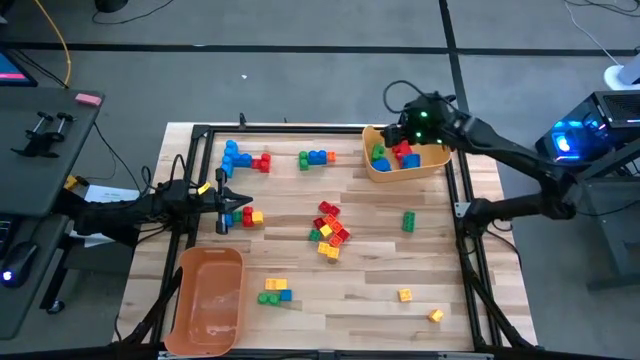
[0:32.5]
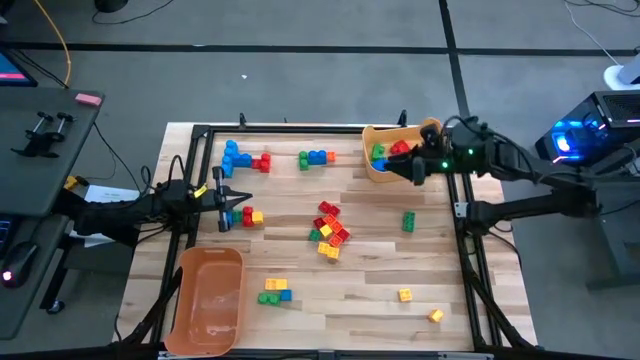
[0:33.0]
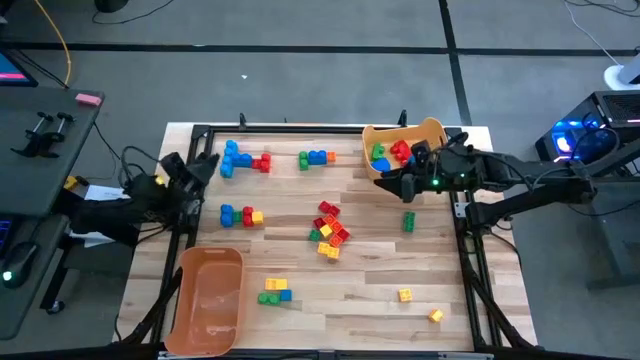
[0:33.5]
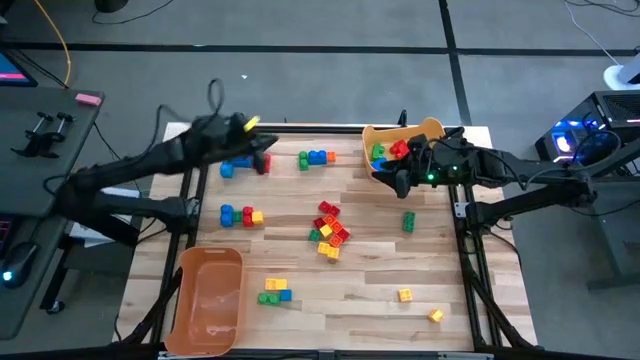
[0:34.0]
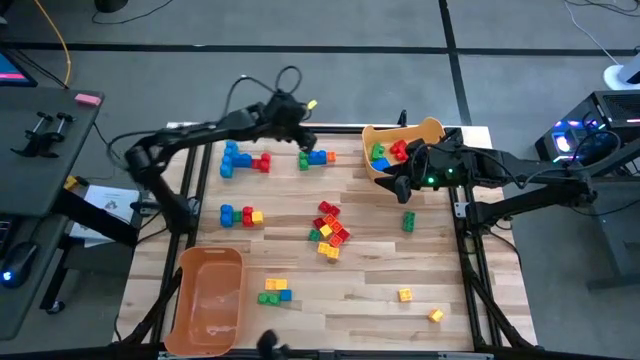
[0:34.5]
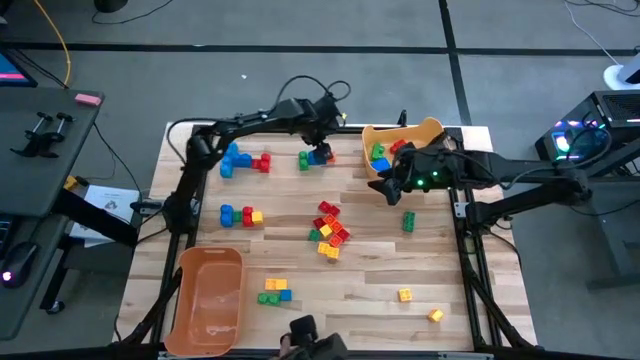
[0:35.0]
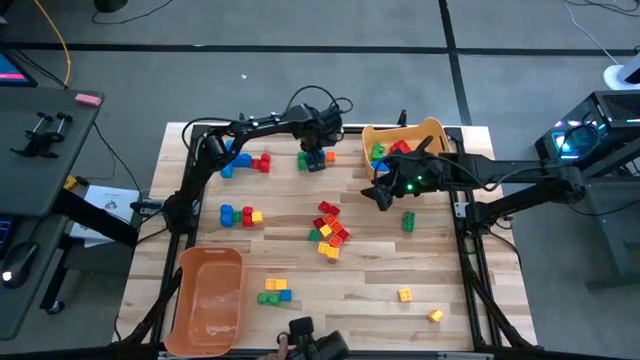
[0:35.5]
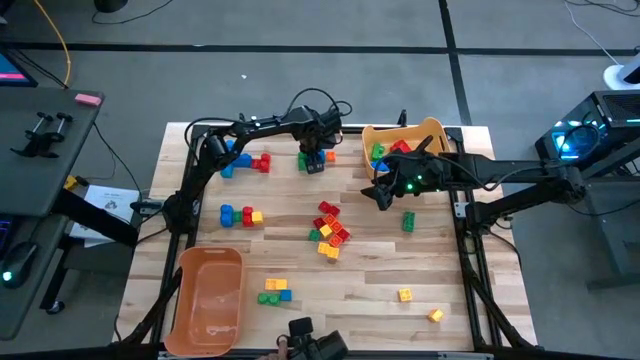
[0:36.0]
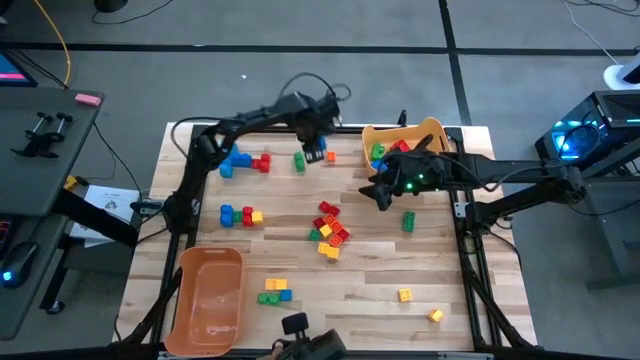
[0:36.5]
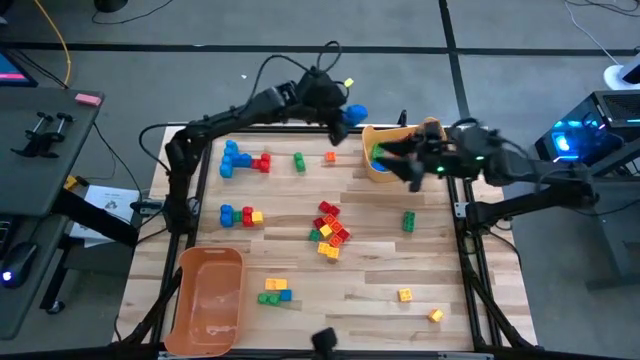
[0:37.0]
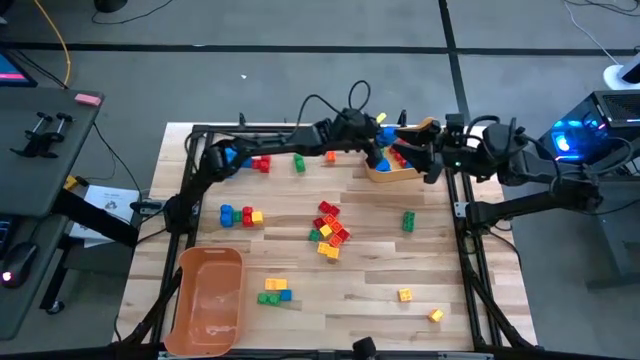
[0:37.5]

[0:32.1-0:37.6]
Task: Sort blocks by size
Put the blue game piece into the yellow bin

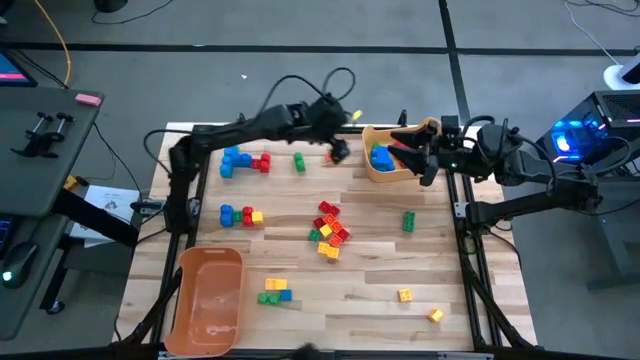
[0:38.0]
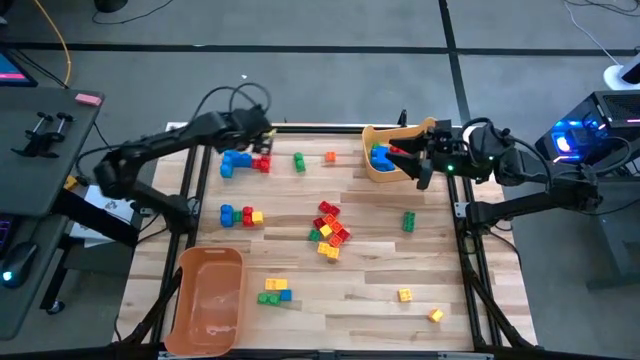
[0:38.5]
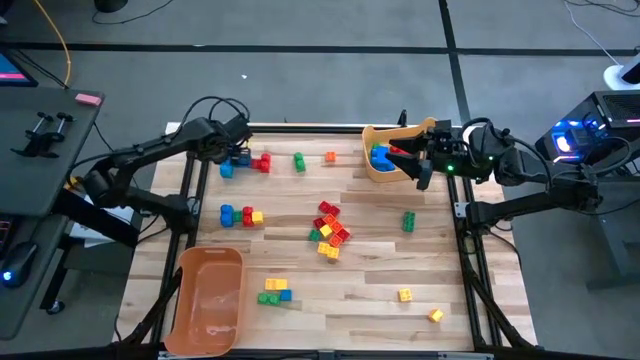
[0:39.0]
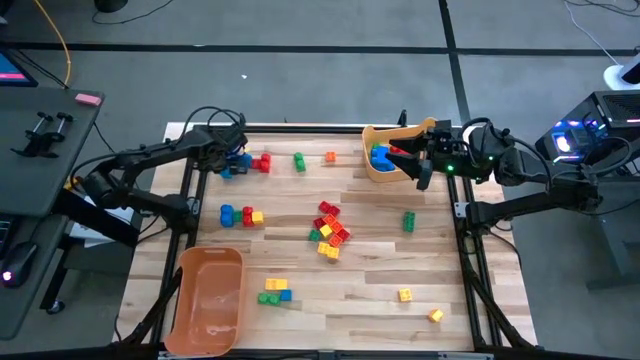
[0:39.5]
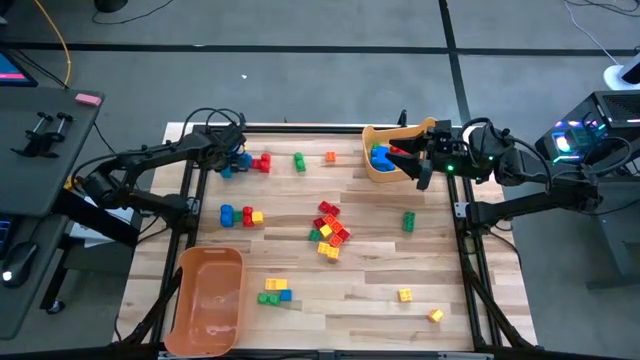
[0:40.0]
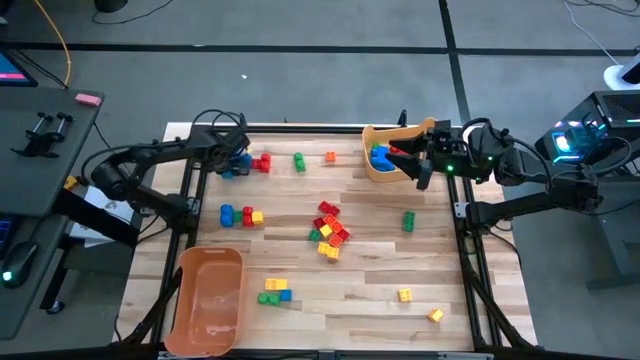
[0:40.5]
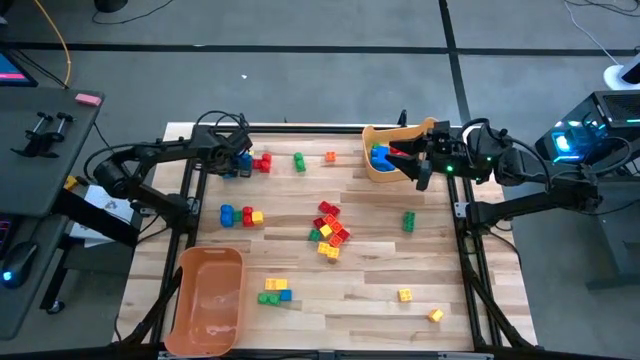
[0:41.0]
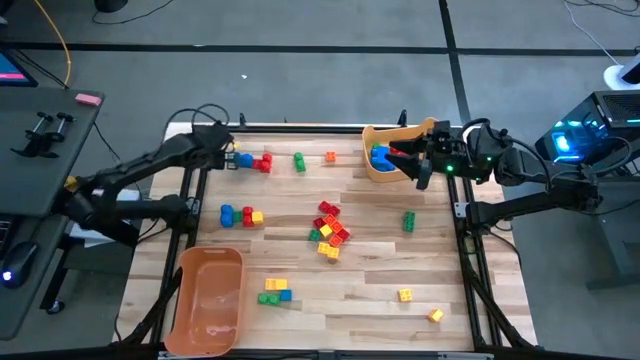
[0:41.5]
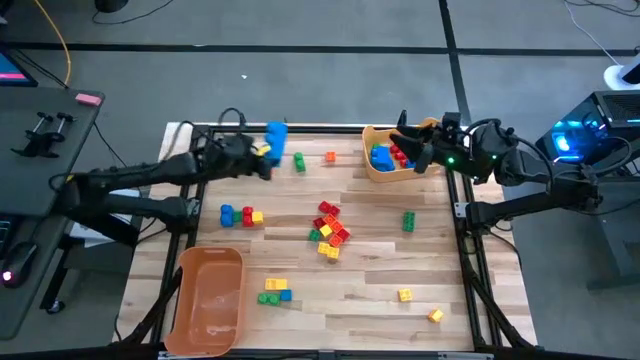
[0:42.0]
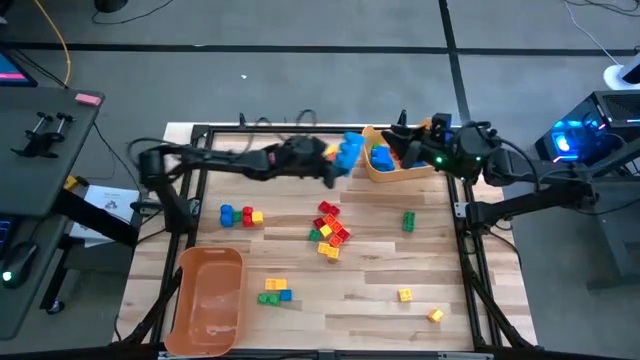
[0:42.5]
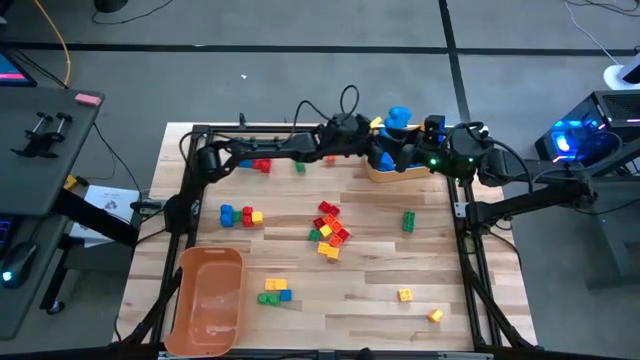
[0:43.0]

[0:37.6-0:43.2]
Put the blue game piece into the yellow bin

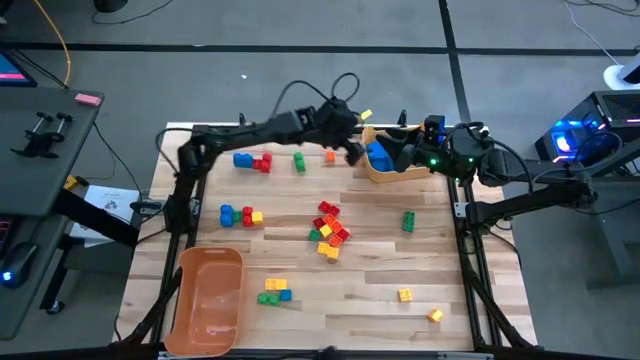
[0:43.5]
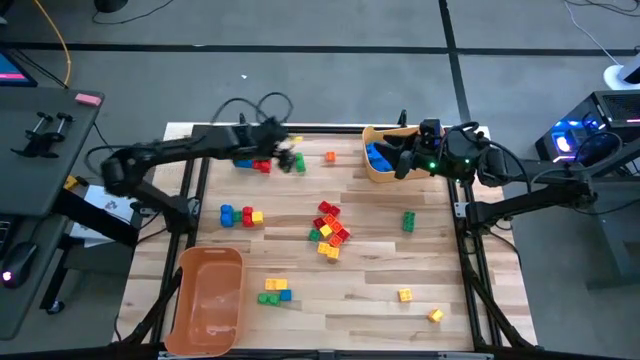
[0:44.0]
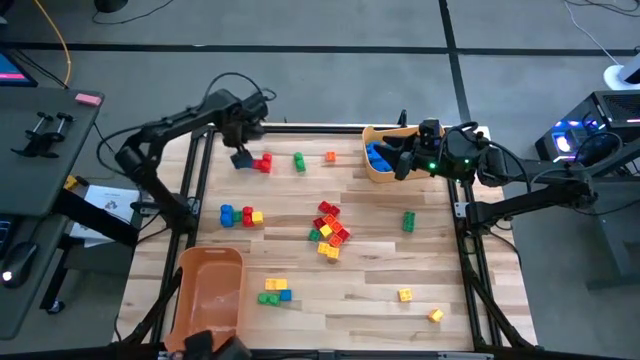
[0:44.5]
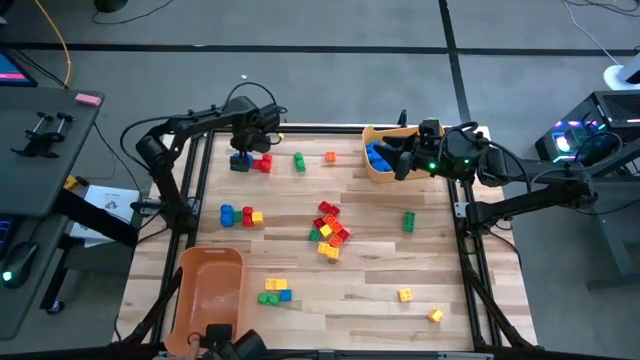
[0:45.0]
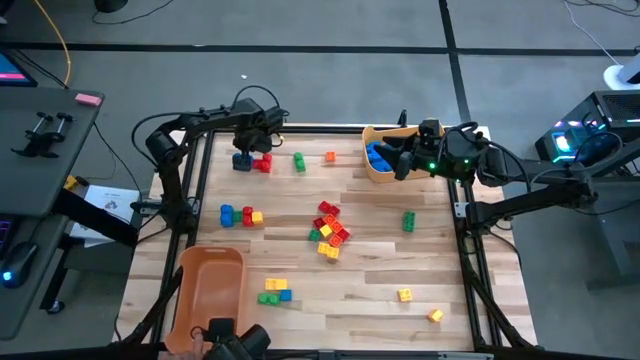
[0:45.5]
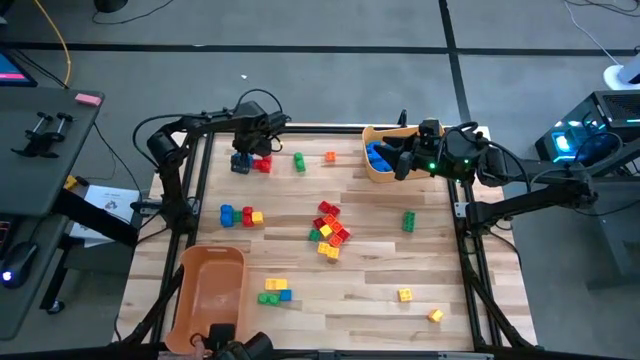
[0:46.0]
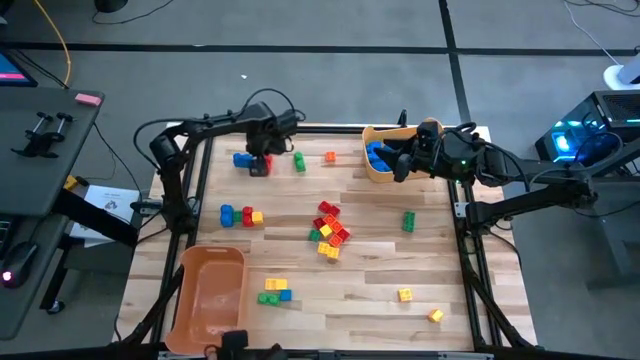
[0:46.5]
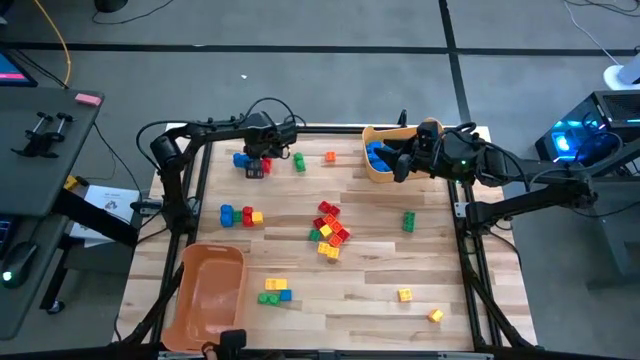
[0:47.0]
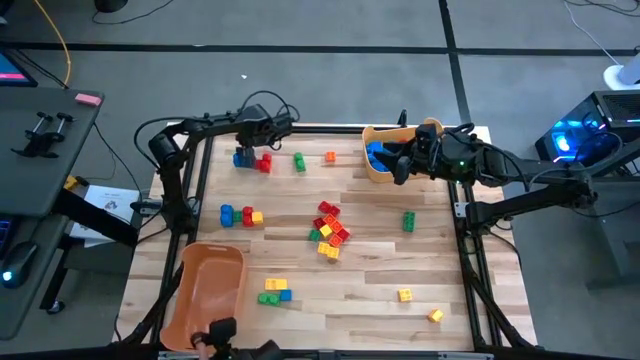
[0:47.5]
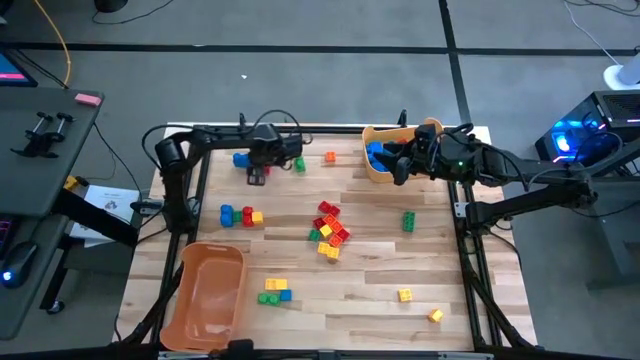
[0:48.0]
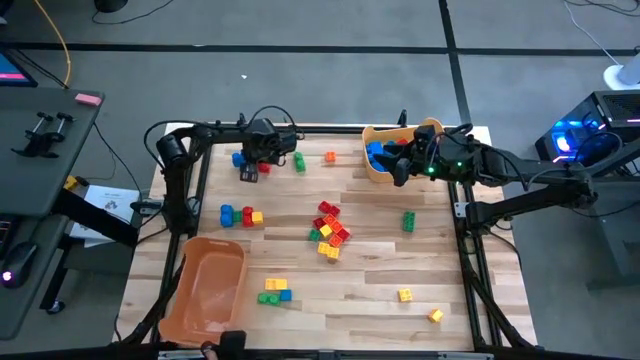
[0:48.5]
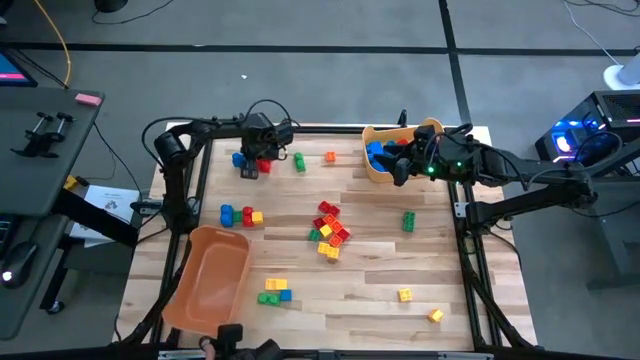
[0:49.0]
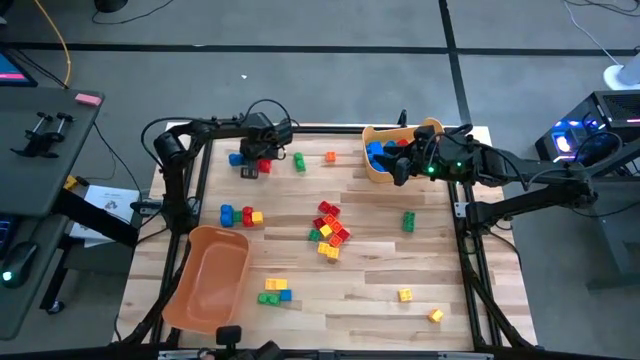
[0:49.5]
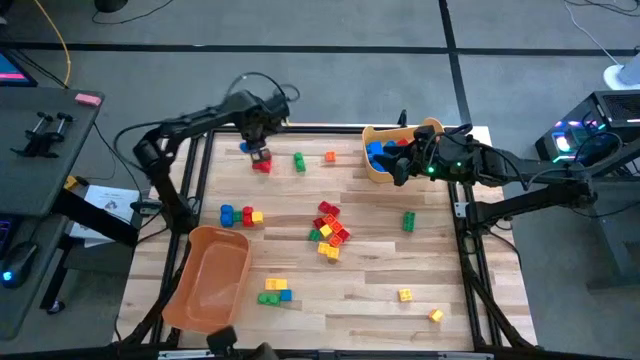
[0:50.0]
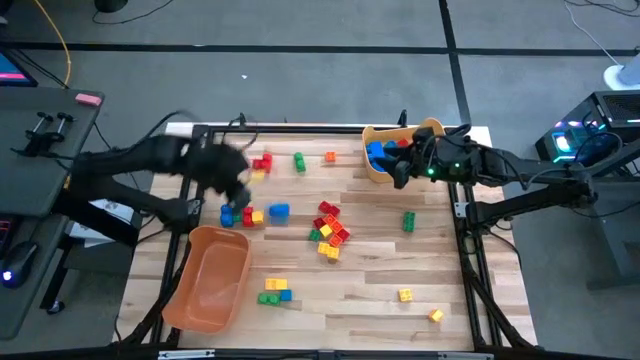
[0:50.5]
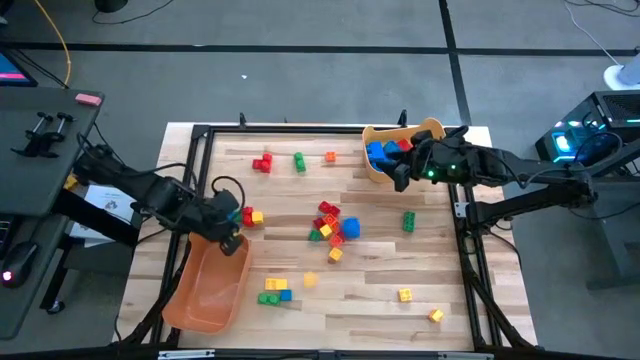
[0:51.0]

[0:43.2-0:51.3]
Put the blue game piece into the orange bin

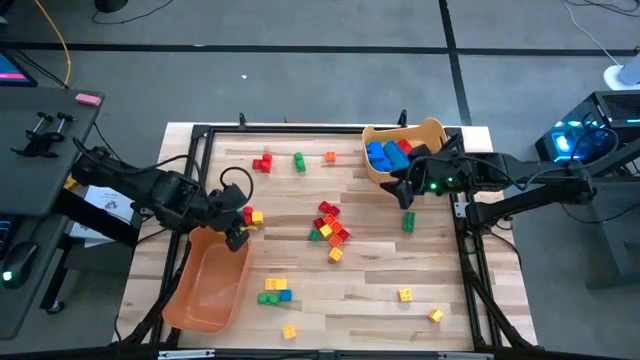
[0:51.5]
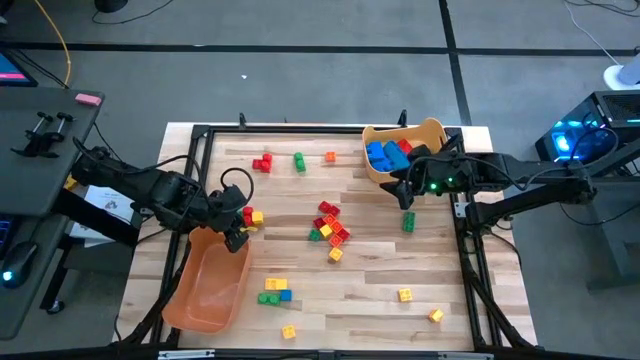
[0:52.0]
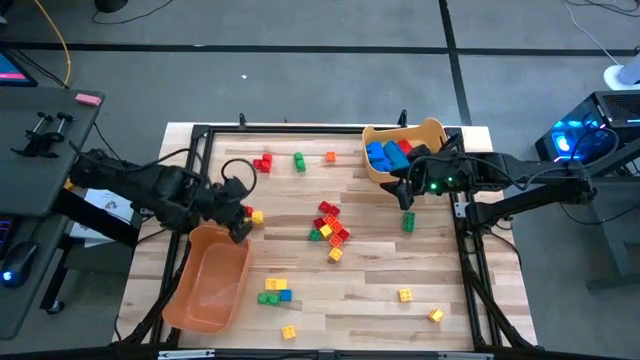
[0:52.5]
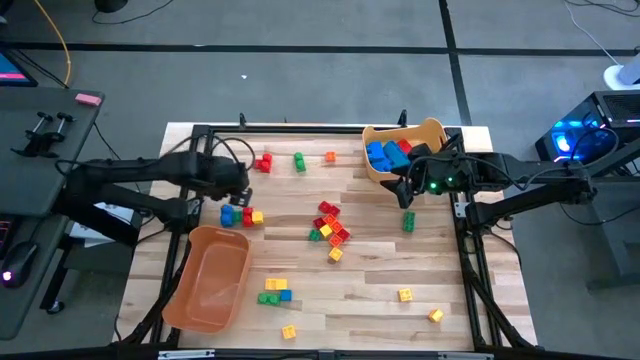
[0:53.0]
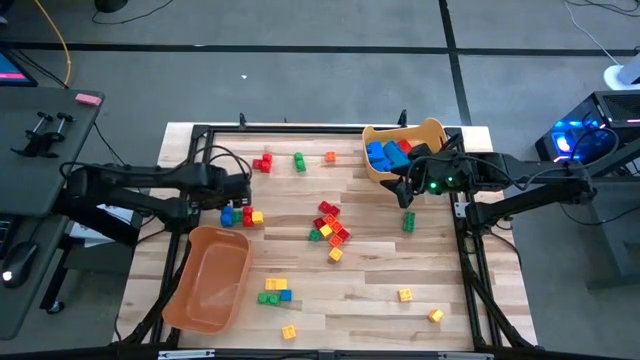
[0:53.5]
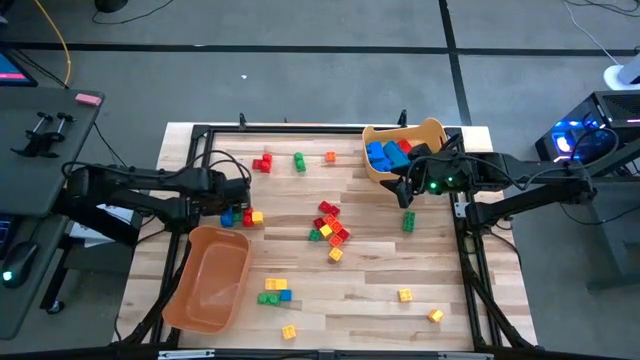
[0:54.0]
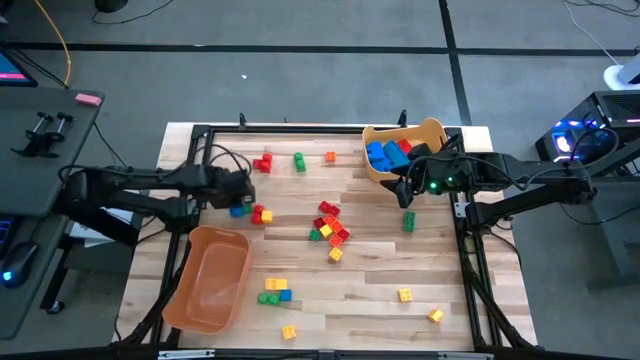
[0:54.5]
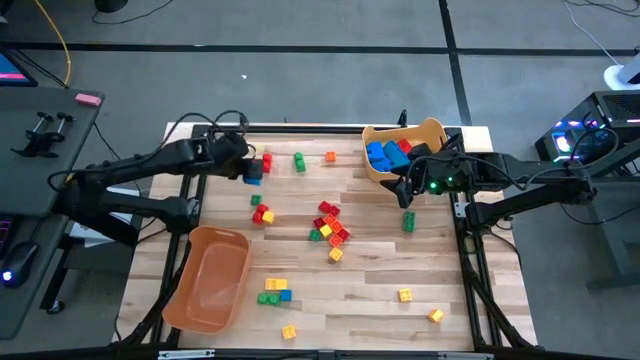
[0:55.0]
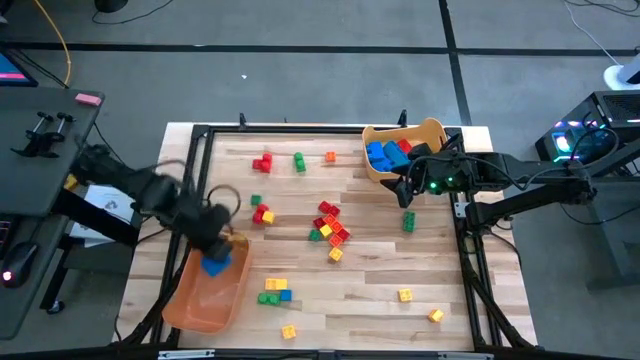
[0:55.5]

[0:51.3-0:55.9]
Put the blue game piece into the orange bin
